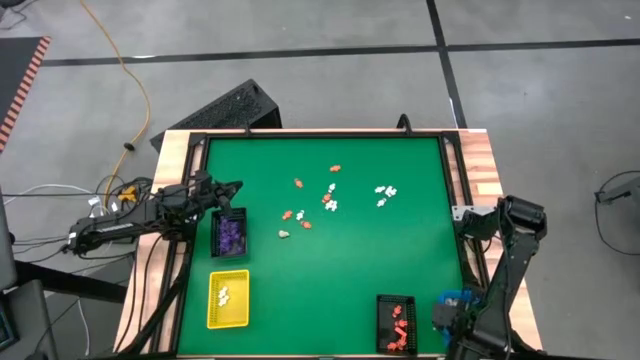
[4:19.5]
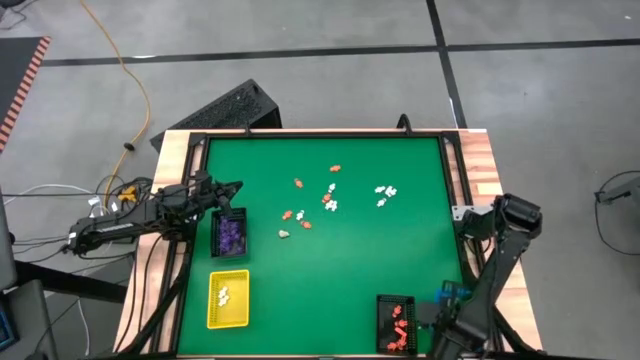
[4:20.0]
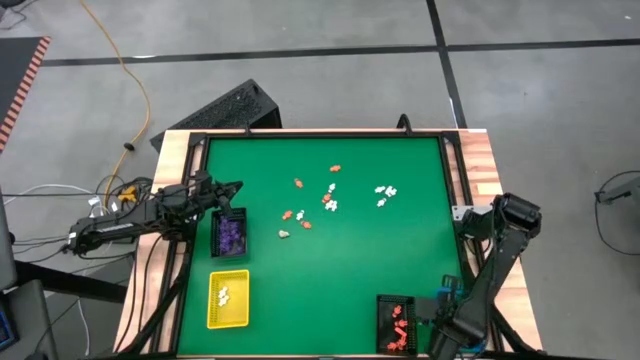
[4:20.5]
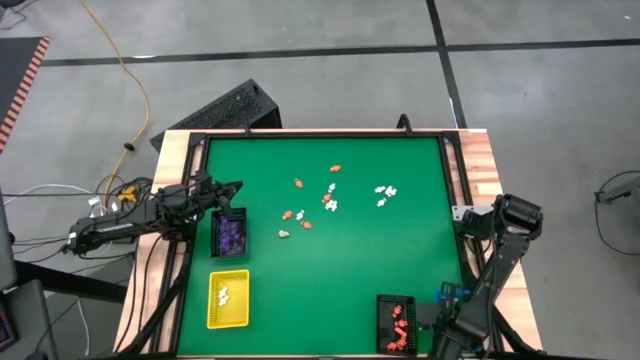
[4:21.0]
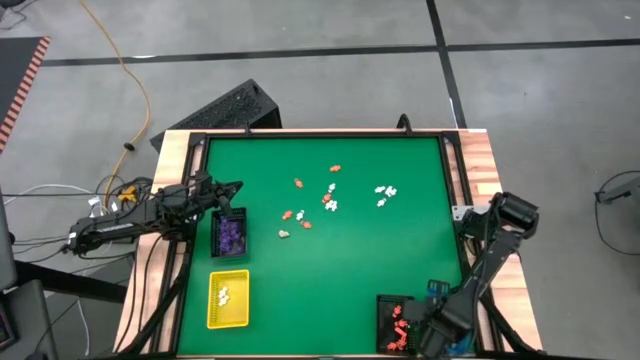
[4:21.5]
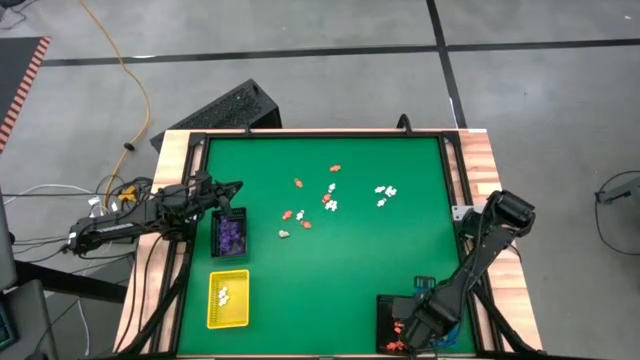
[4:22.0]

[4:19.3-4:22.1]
Task: Sort Halloween decoration
Adjust the blue basket

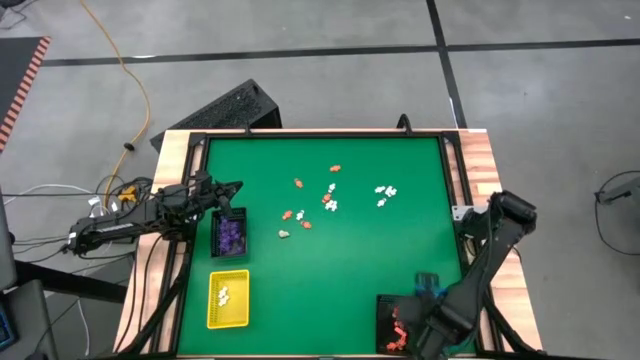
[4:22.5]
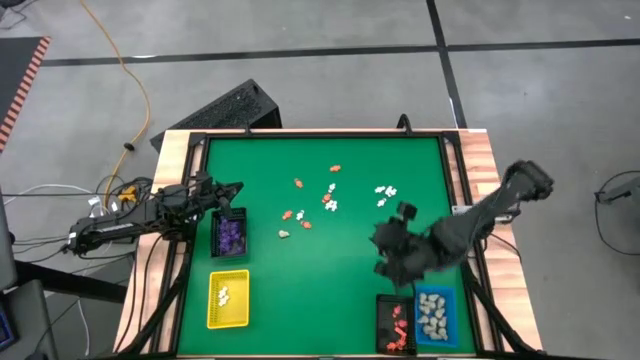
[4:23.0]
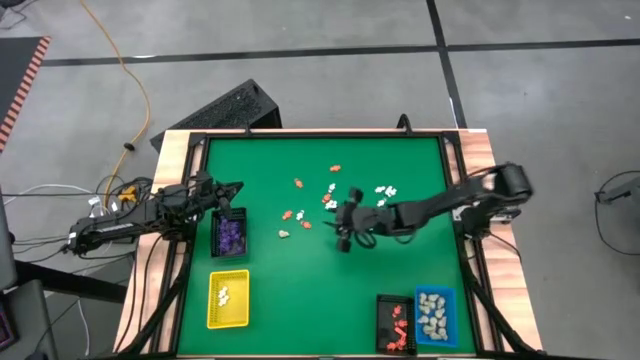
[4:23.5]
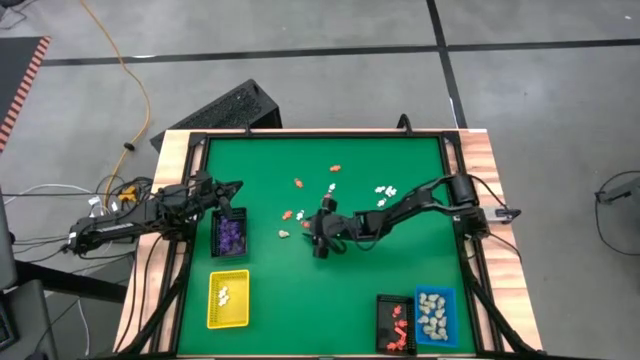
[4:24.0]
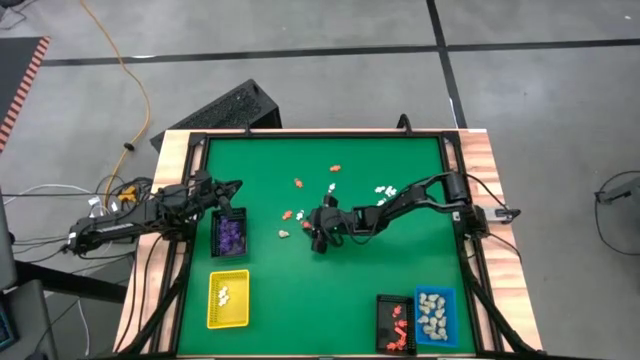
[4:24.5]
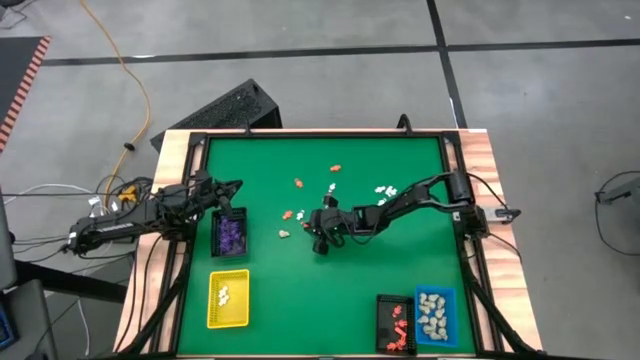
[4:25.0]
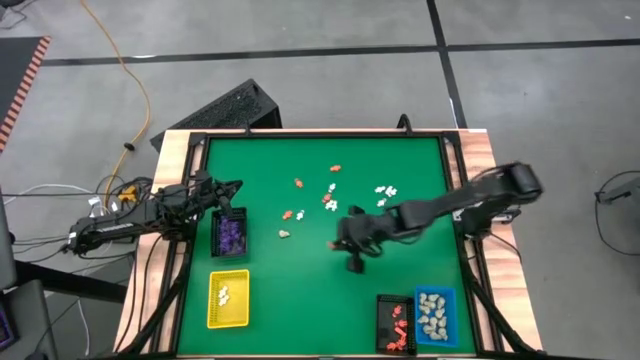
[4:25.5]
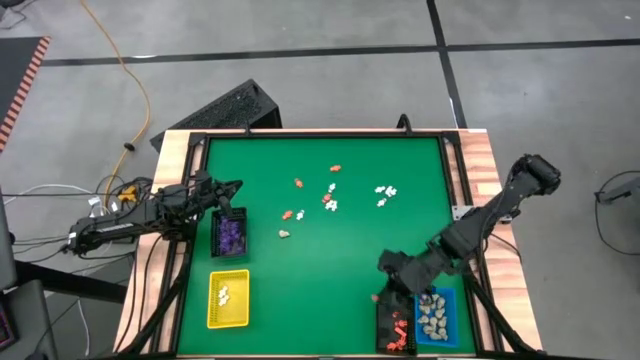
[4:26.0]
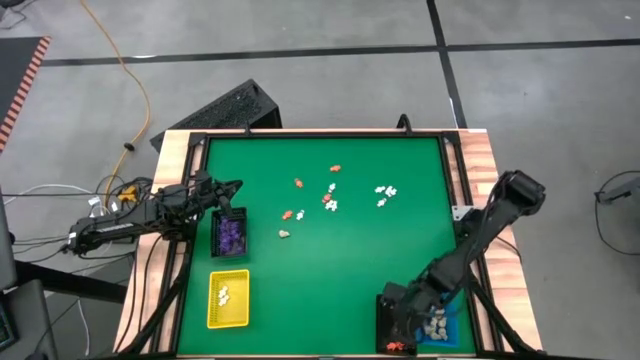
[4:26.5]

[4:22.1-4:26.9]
Put the orange skeleton toy into the bottom black basket

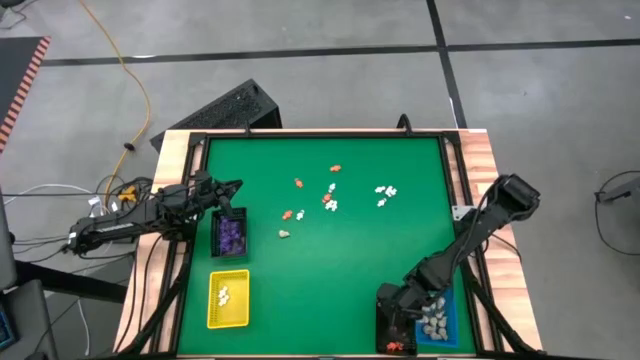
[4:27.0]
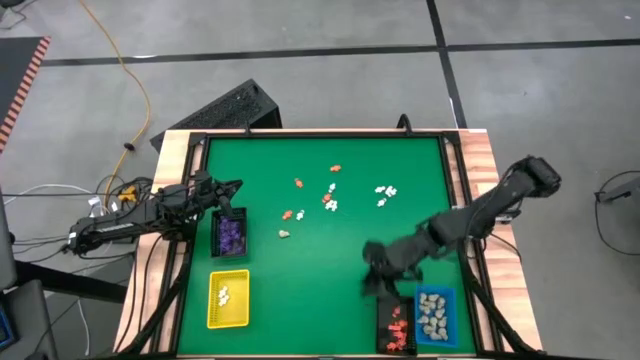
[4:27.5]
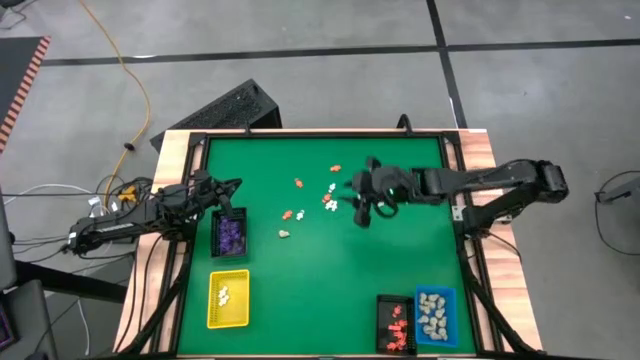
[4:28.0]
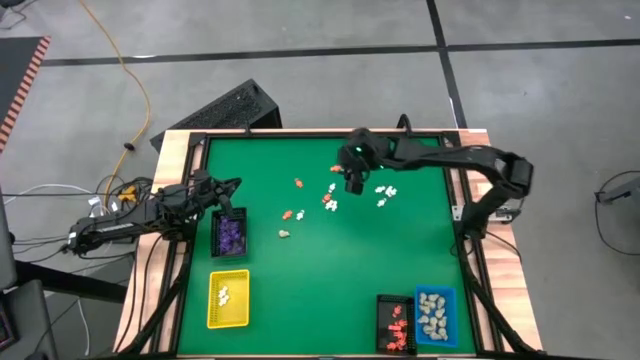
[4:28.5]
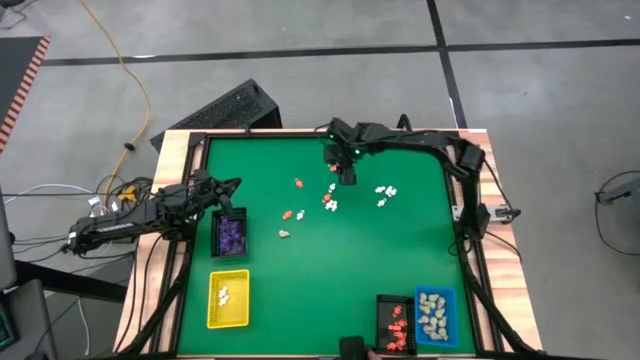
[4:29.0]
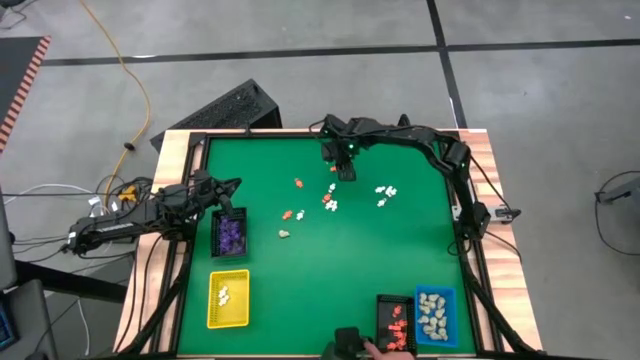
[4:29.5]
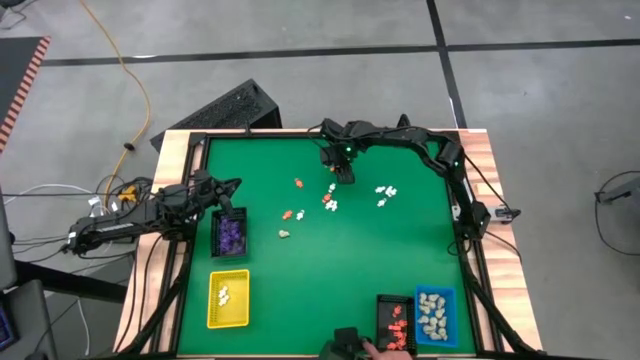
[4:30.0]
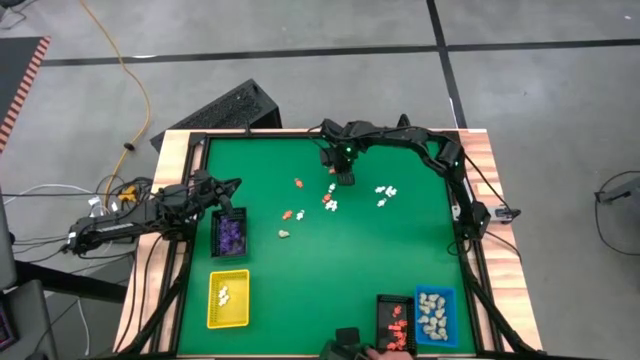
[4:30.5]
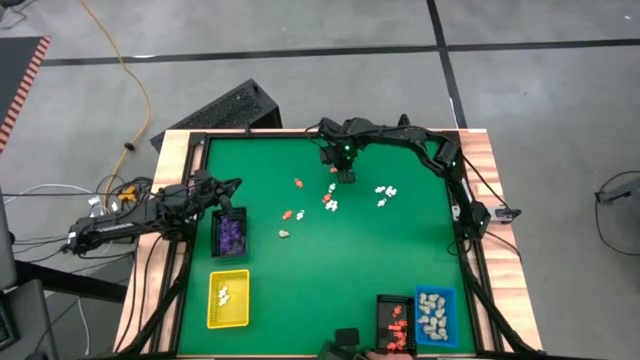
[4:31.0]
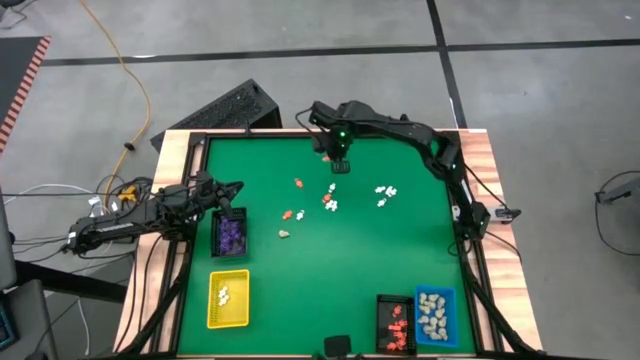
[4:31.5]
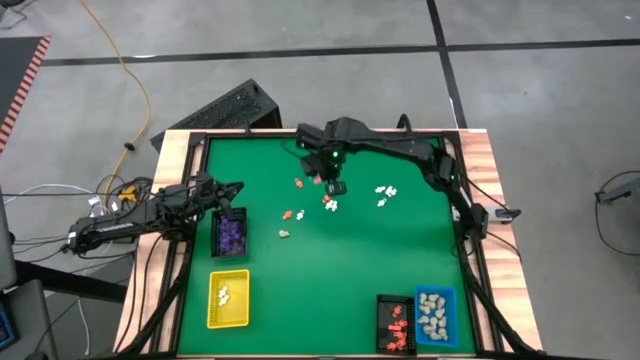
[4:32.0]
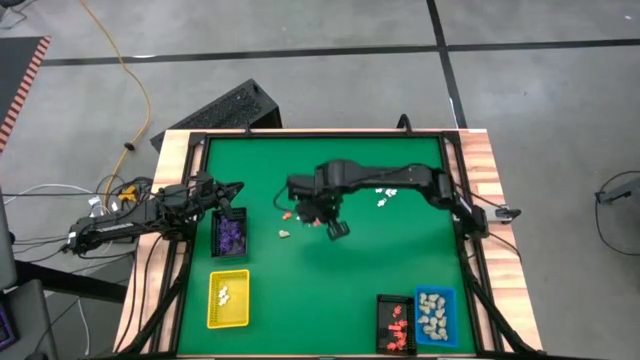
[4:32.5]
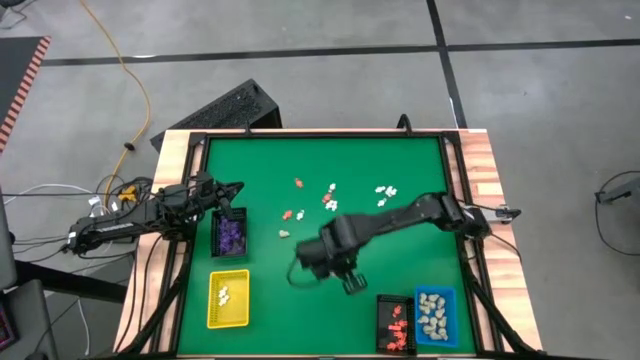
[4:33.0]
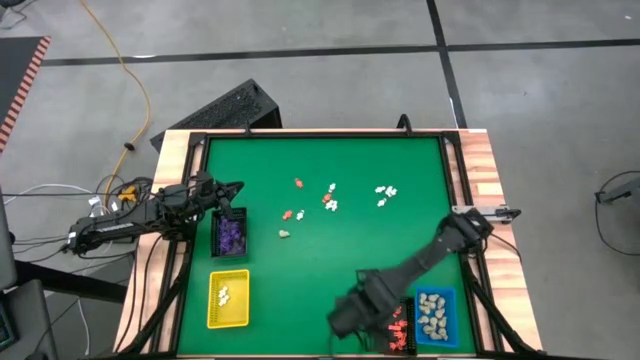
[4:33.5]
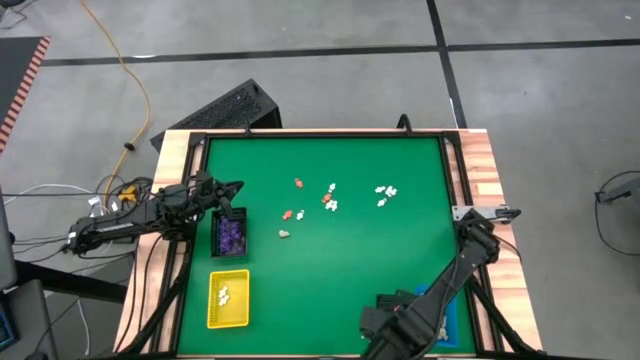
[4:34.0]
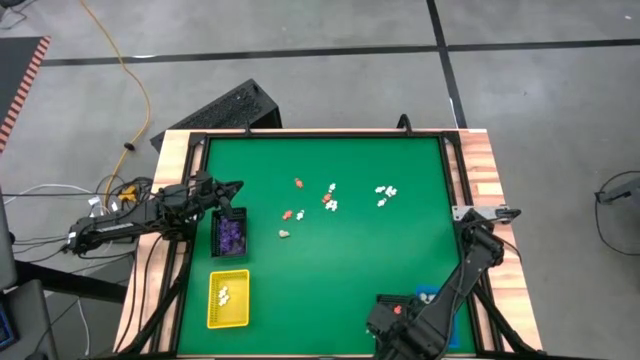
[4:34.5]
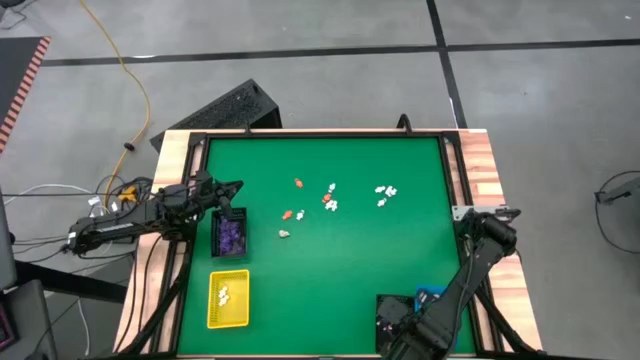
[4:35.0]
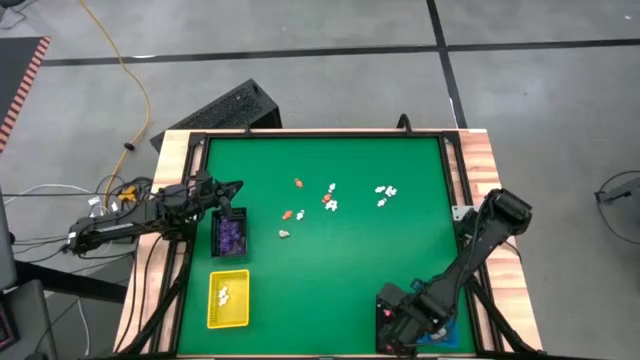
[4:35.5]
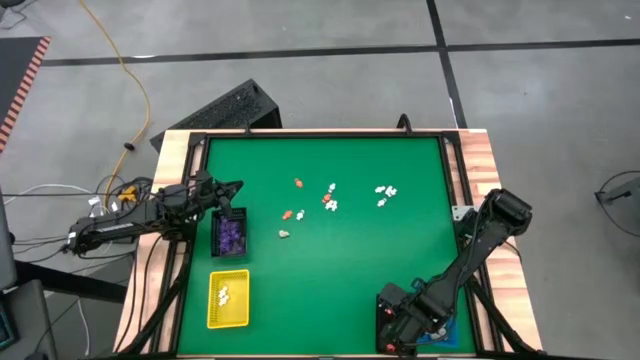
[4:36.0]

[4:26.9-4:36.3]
Put the orange skeleton toy into the bottom black basket

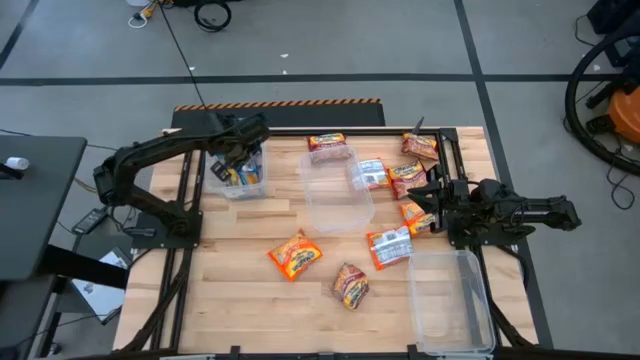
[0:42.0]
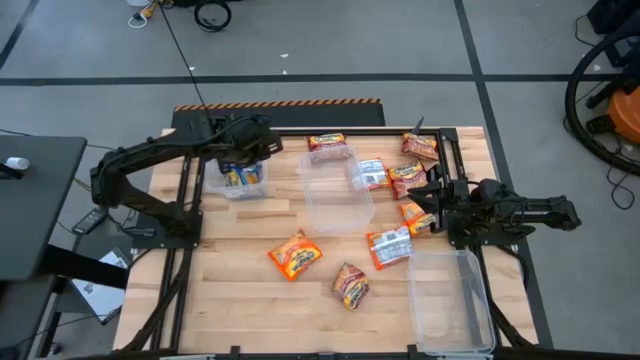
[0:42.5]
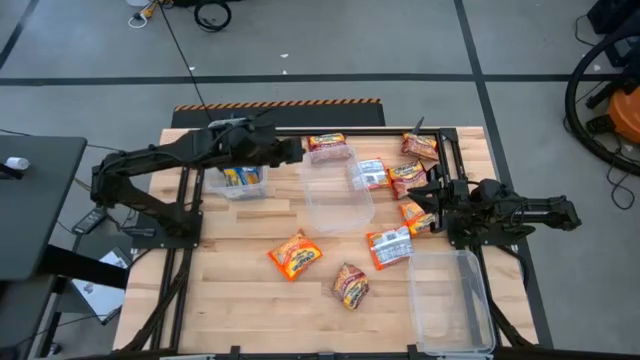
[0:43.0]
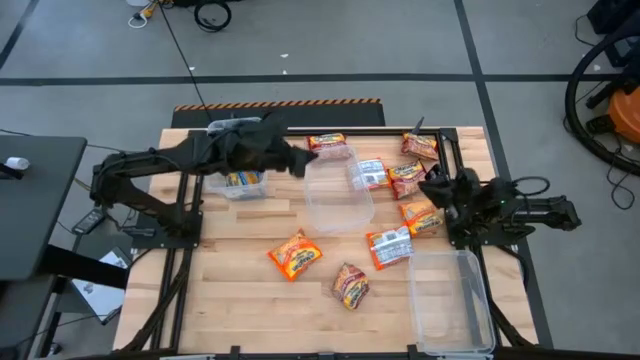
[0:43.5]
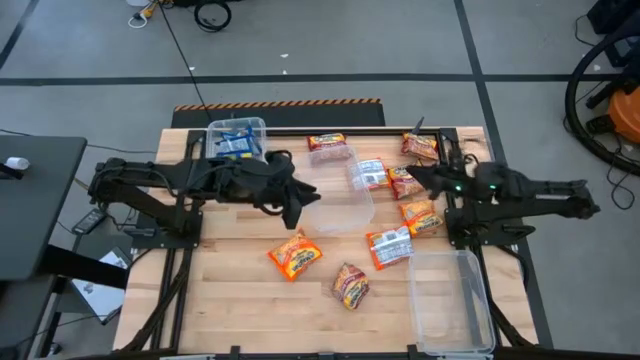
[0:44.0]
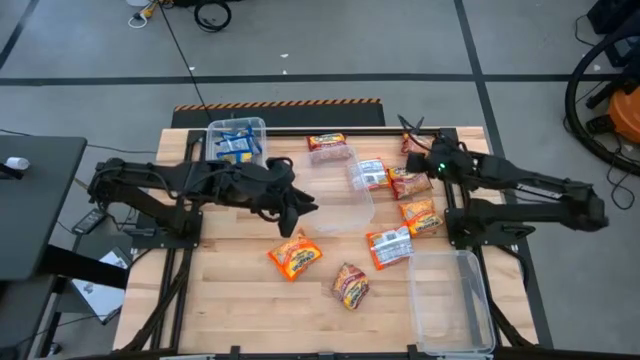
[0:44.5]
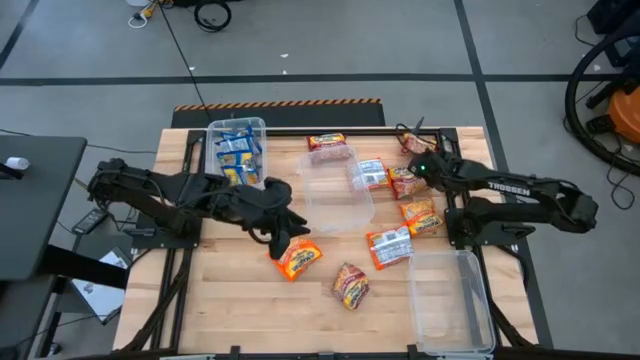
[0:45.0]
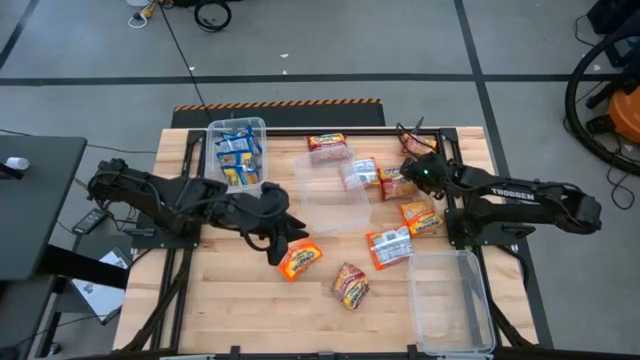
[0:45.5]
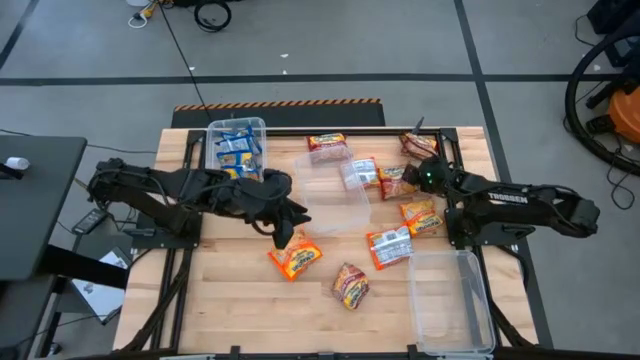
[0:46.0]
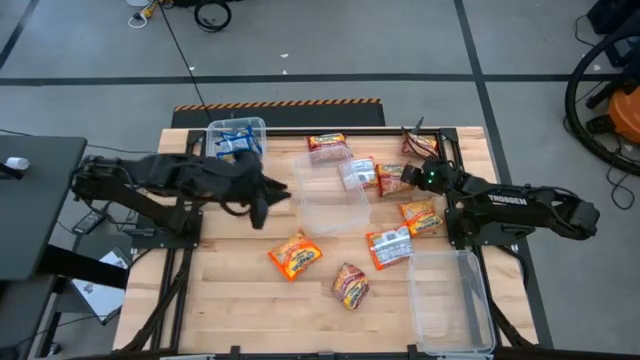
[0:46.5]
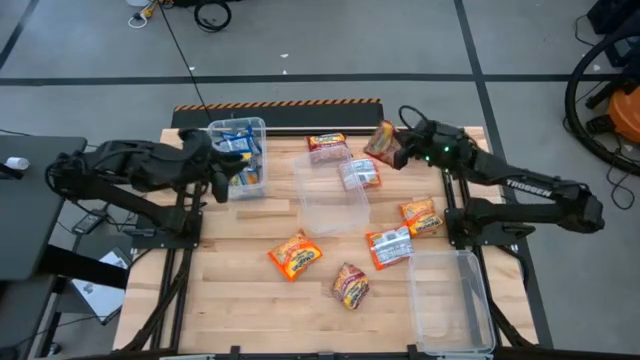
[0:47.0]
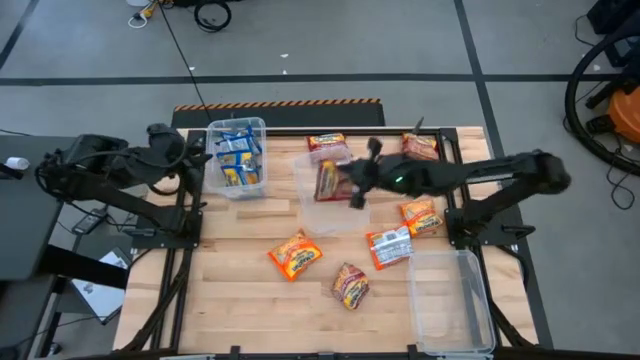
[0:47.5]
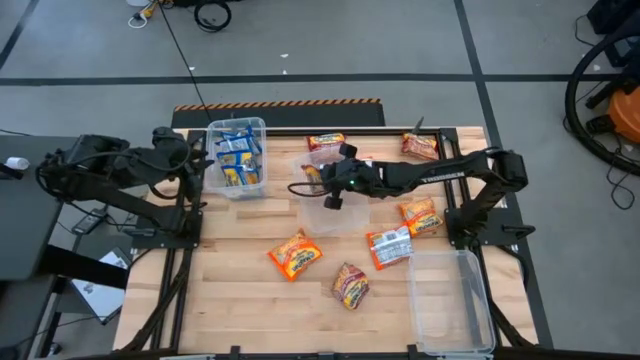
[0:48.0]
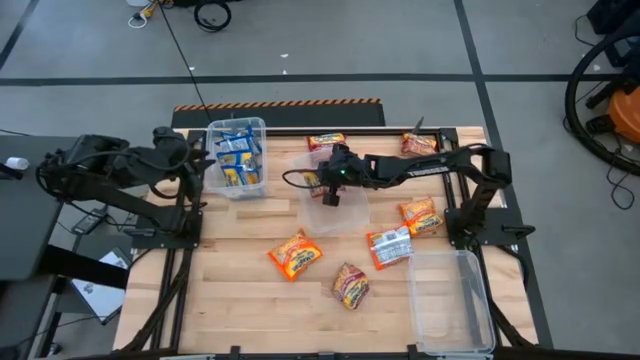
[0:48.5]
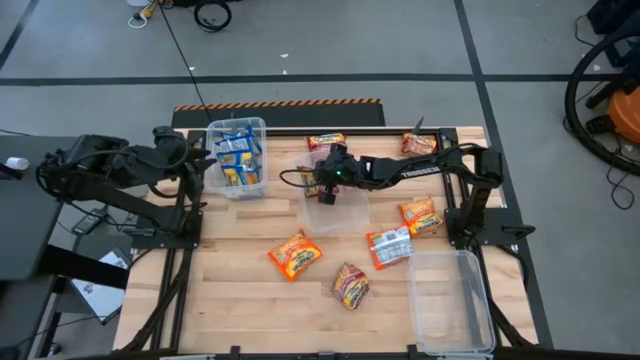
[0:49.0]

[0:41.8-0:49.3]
Task: Sort Maruchan noodles
Put the red noodle pack into the middle transparent bin
